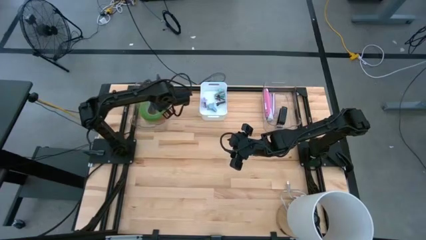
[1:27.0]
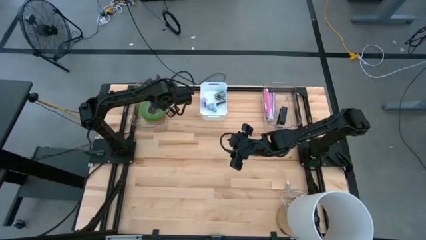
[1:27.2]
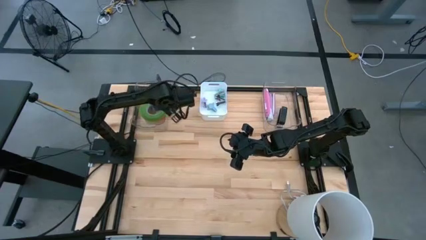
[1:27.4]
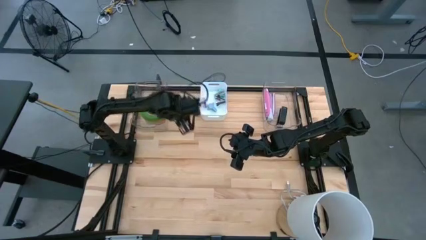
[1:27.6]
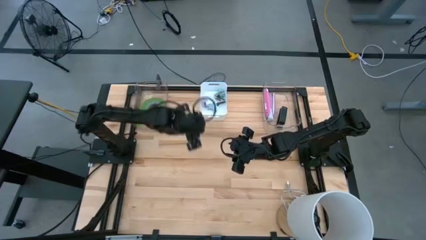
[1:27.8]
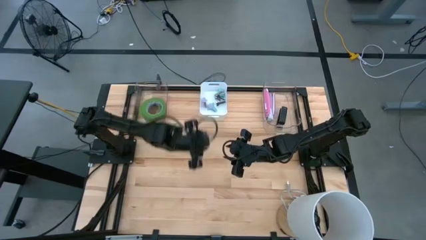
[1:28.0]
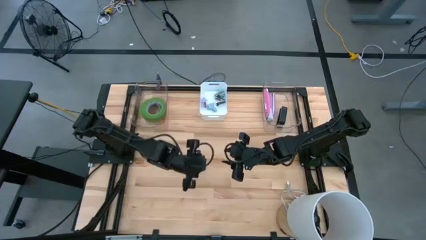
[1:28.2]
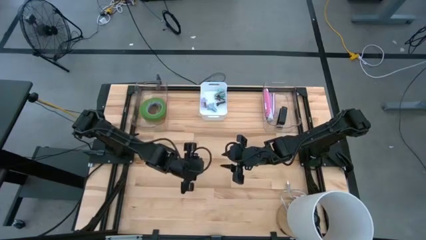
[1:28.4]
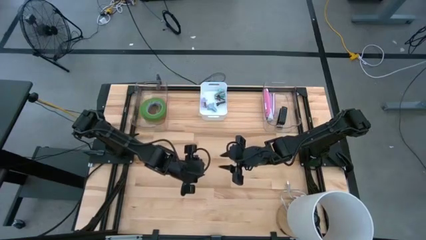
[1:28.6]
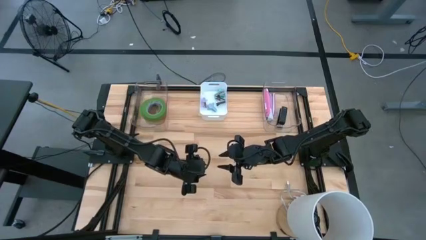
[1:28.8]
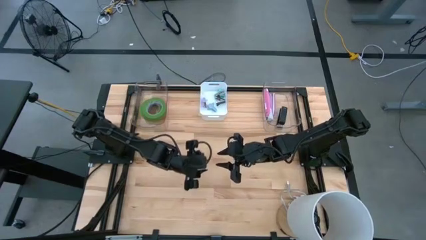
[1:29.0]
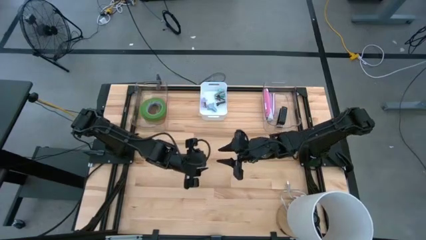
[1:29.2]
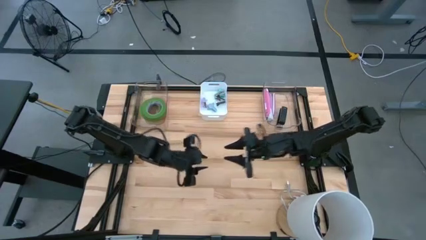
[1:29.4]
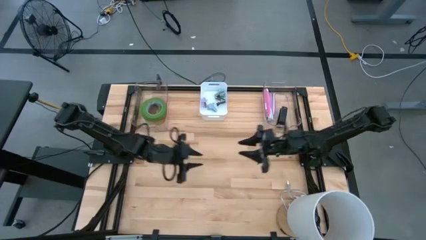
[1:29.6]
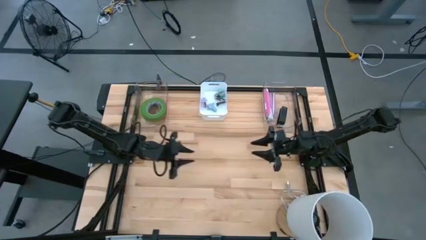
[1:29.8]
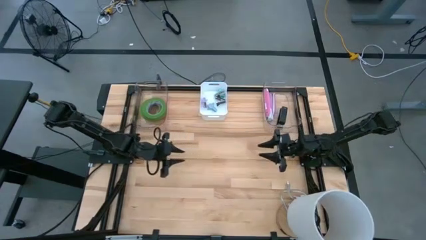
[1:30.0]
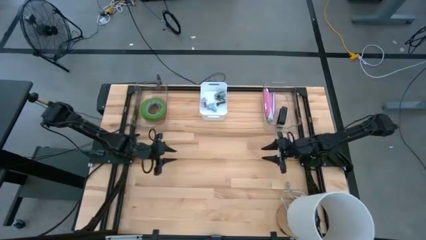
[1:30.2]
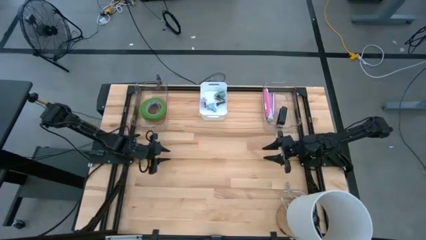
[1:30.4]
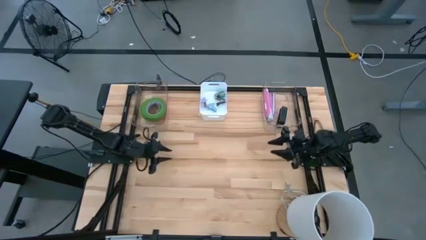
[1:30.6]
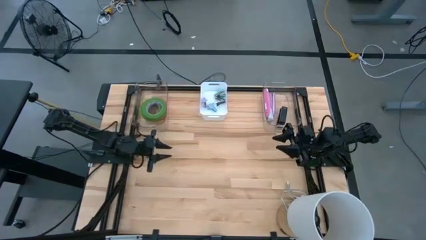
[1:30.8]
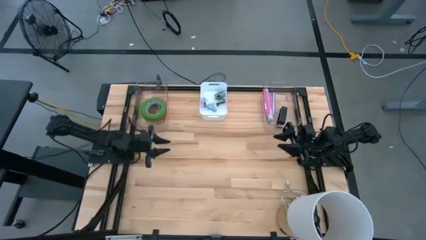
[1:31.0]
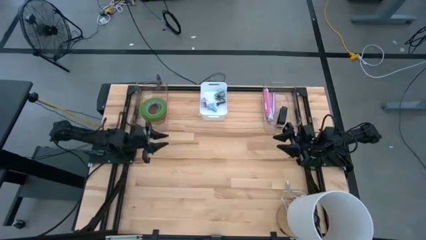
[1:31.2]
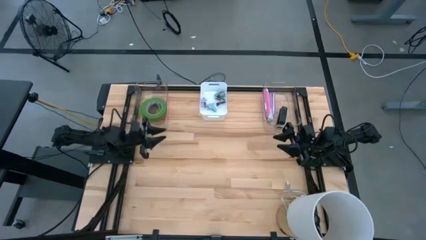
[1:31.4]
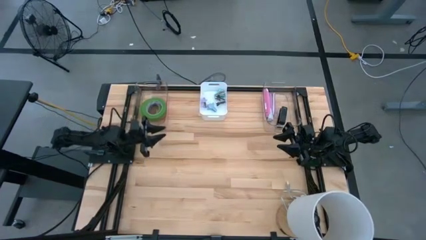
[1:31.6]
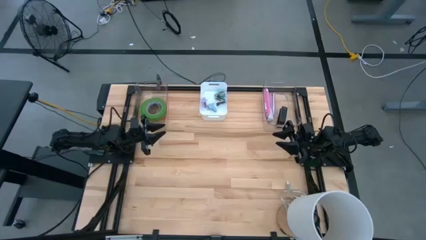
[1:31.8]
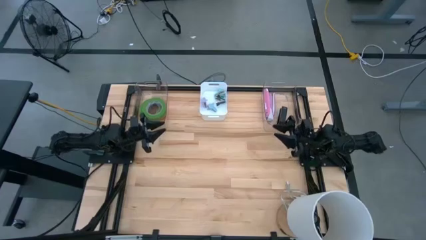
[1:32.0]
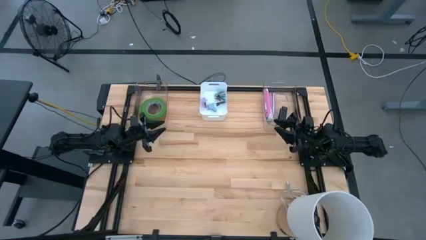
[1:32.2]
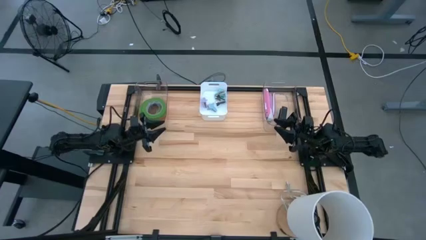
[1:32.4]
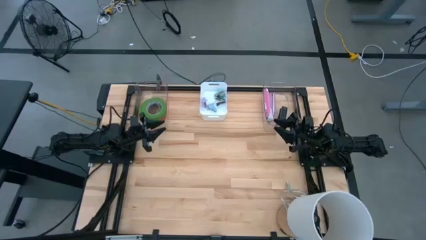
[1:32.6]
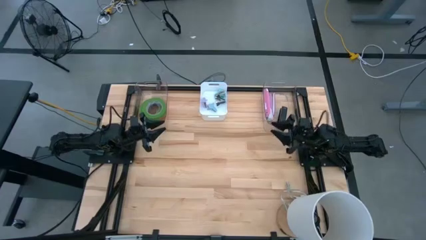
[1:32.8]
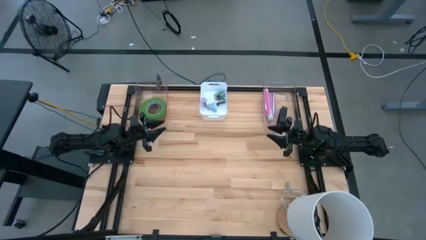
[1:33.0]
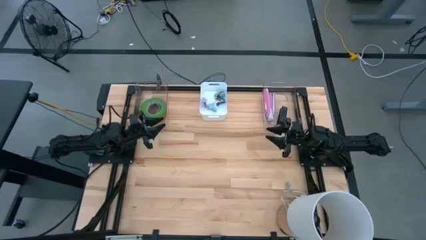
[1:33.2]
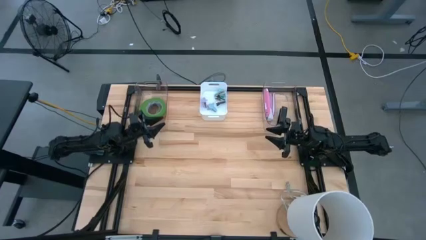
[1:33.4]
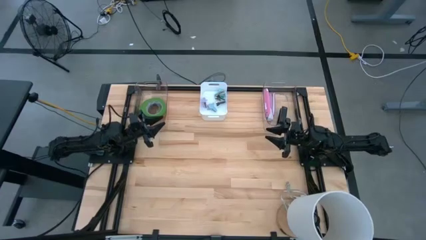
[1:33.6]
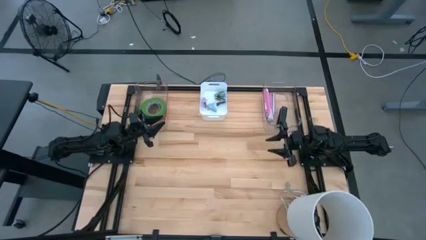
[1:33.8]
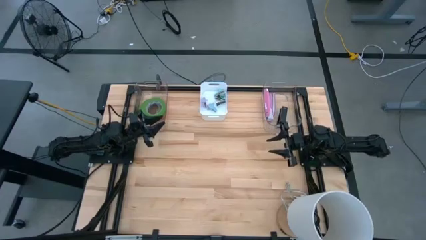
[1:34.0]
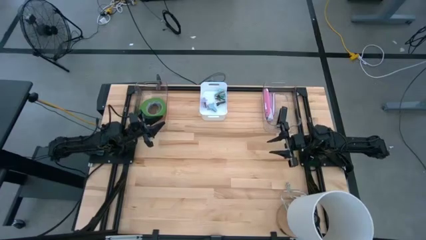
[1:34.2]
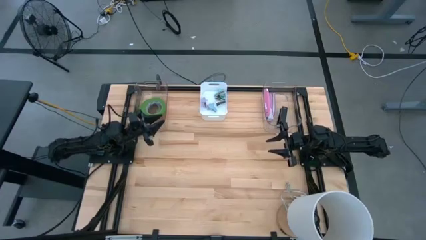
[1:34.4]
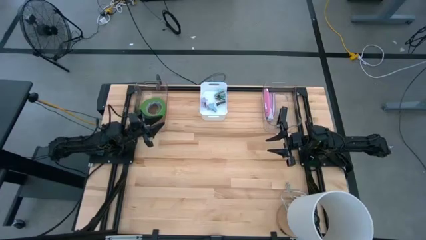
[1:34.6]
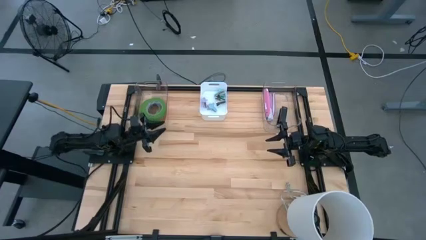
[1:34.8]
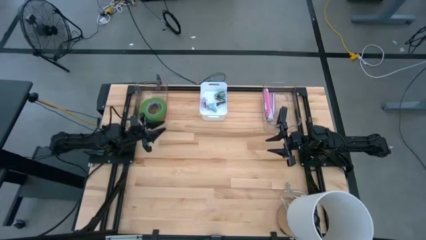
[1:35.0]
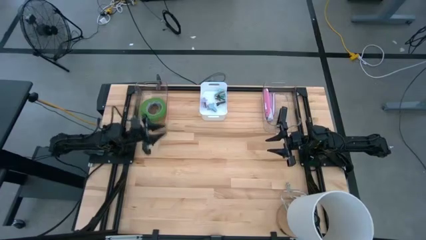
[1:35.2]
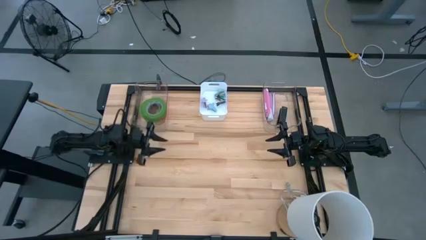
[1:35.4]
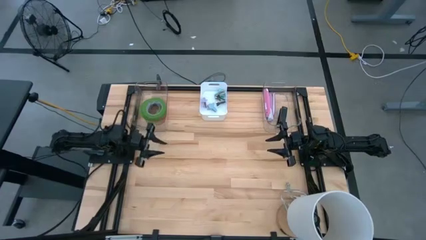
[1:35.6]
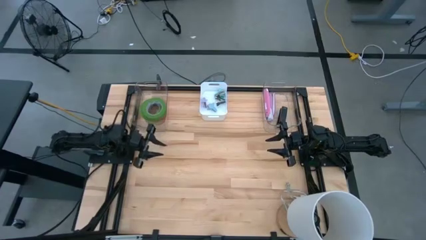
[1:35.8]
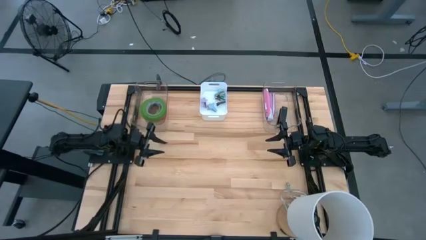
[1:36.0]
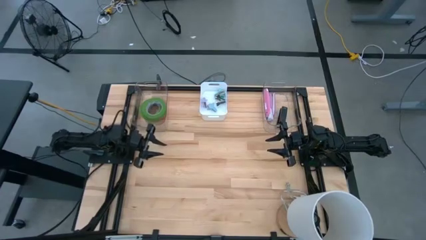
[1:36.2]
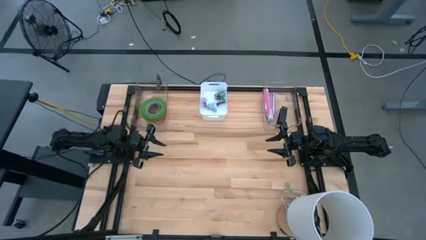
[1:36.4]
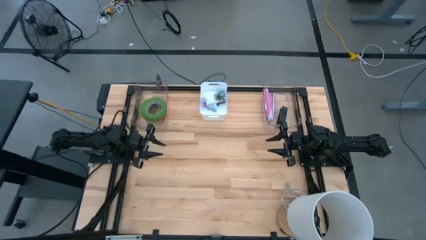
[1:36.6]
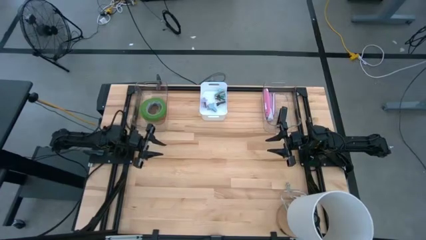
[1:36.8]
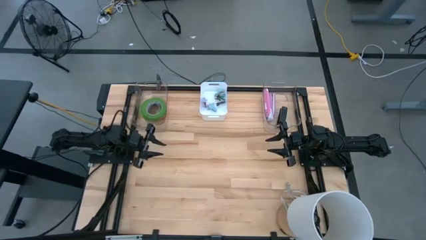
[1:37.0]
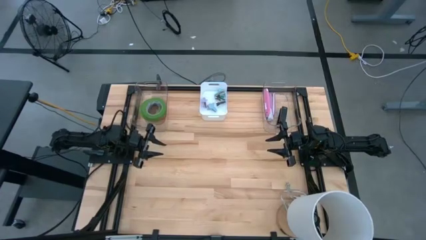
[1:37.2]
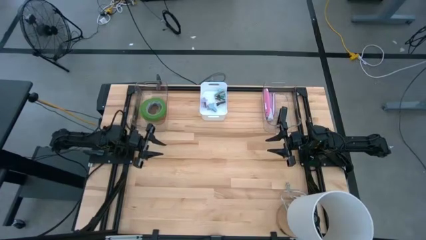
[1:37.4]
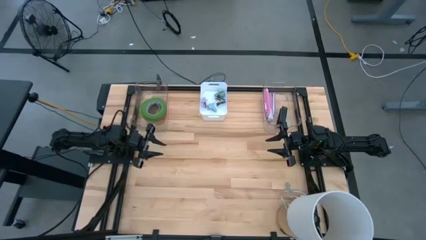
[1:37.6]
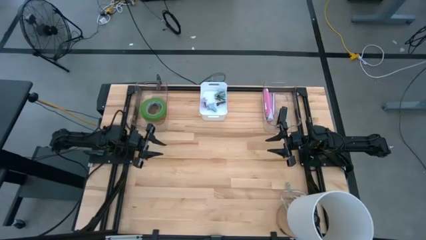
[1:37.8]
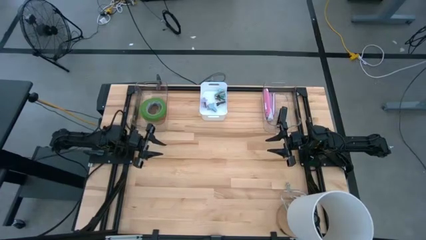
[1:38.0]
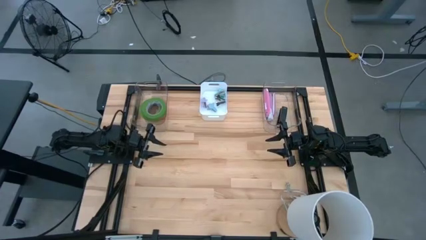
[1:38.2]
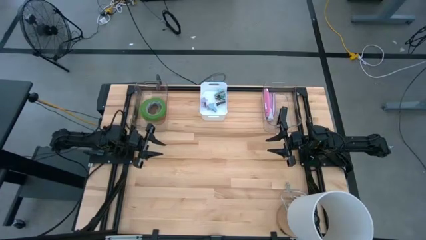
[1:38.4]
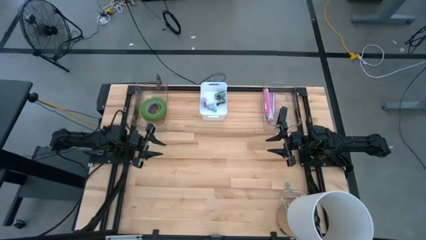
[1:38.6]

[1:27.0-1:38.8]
Task: Pick and place Stapler, Stapler remover, tape
Return to Home Position

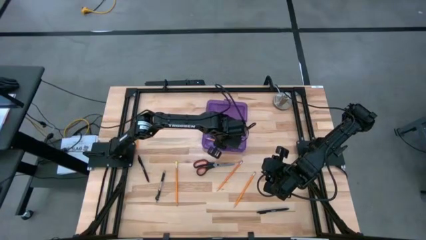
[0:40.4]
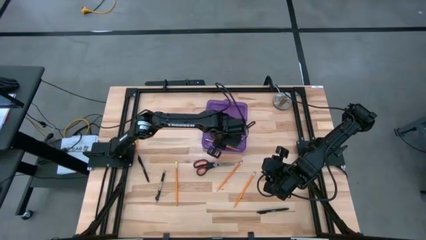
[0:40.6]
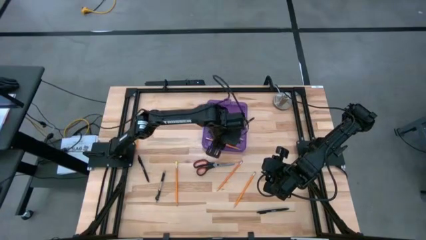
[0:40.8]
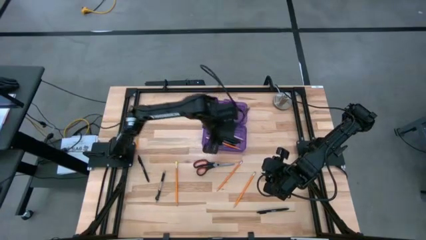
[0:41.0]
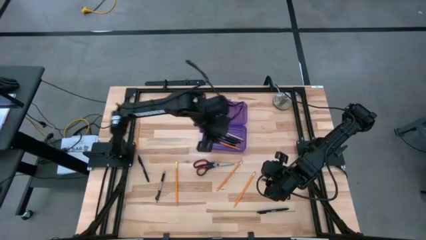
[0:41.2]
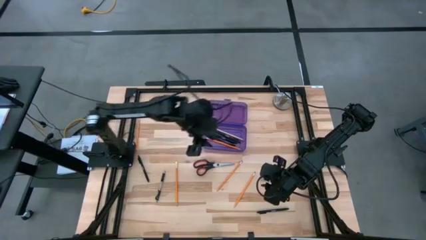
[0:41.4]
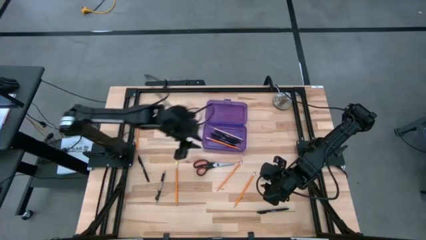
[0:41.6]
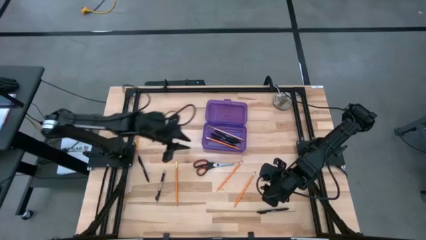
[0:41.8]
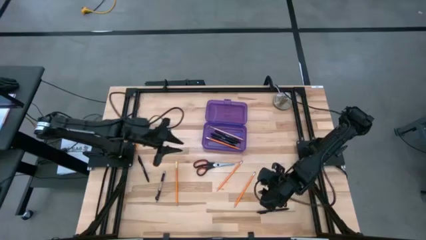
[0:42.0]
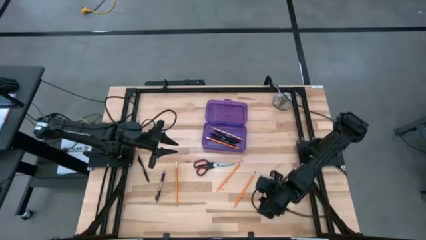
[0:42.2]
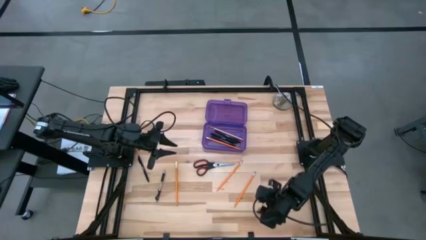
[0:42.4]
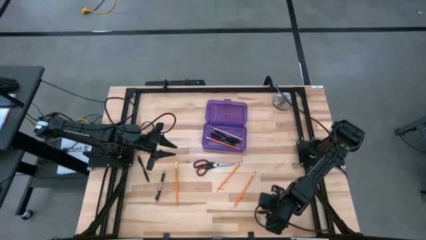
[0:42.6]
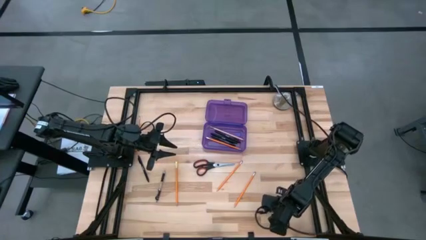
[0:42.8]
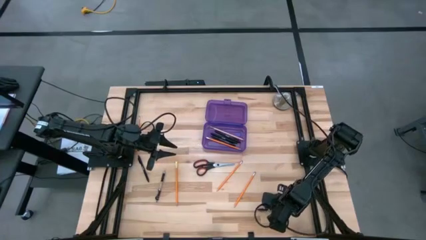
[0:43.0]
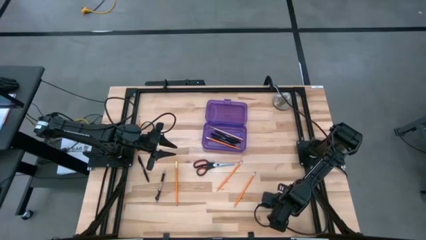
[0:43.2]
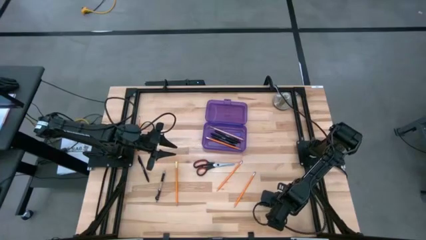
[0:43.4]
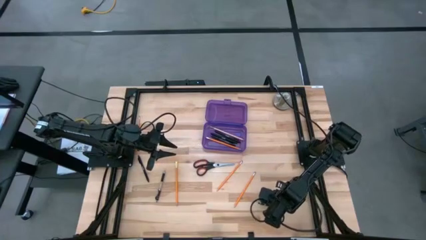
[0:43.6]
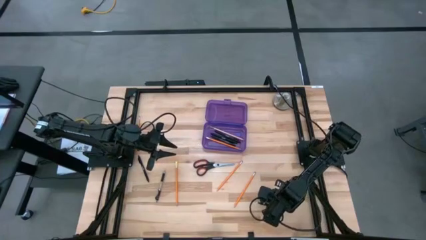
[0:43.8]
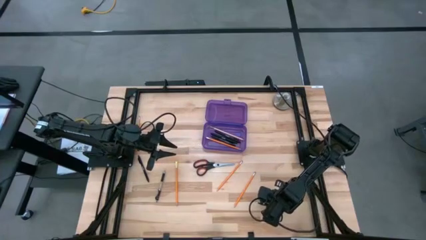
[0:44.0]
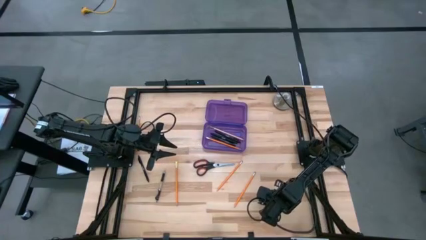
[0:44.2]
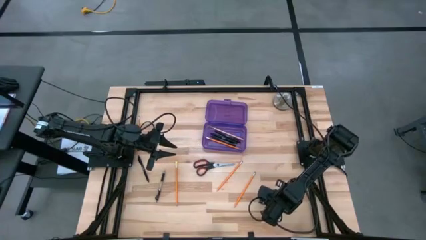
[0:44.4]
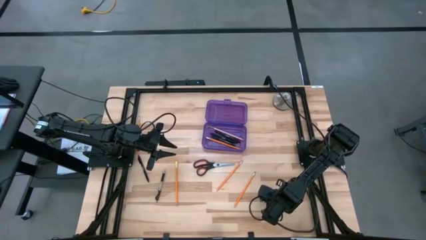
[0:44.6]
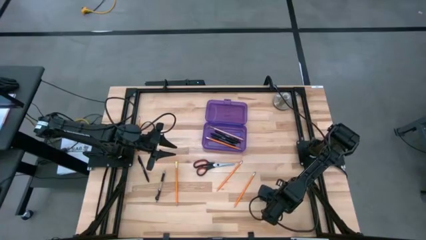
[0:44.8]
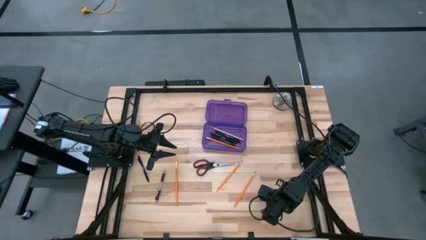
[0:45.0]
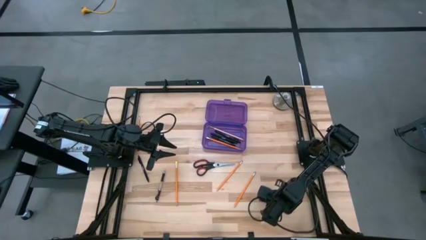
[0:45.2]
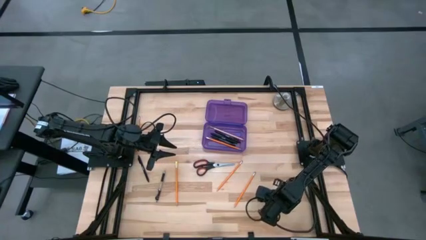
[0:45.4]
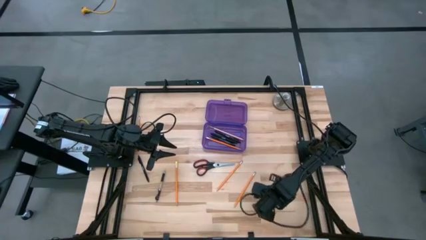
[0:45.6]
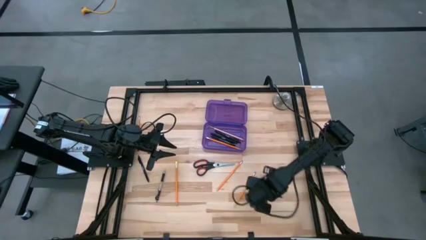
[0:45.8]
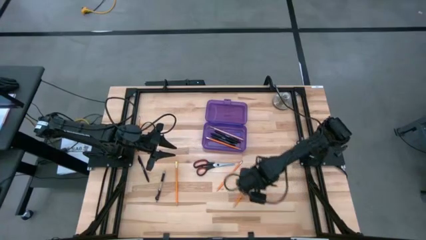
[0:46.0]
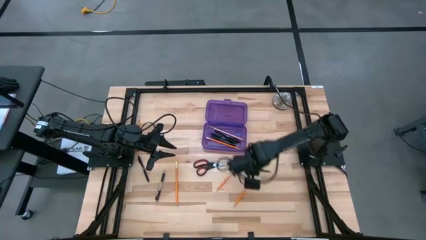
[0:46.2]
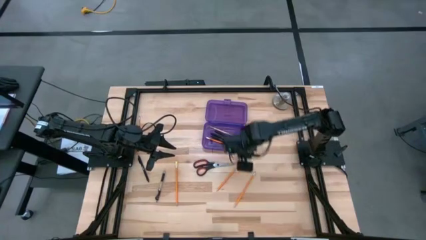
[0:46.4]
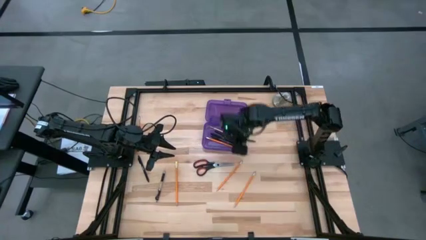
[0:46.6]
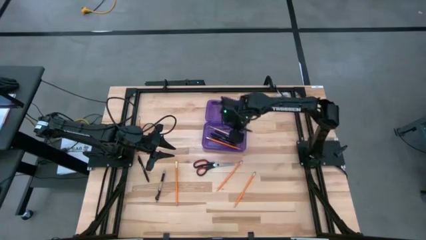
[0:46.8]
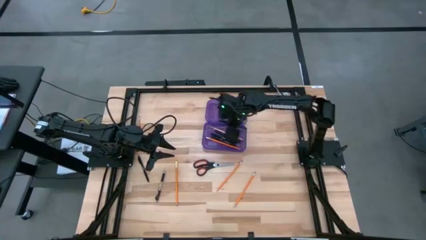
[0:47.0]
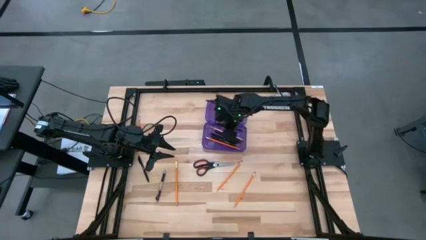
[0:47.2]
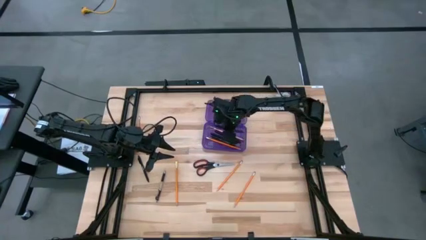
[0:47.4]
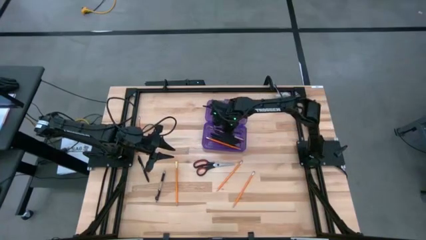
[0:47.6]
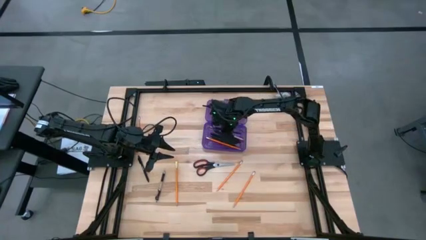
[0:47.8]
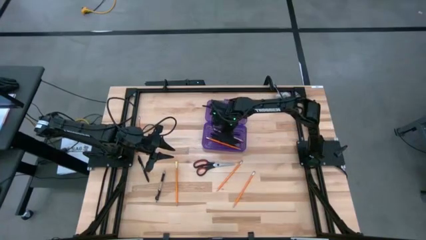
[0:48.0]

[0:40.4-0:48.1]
Task: Pick & place school supplies into a supply box
Put the bottom black pen into the pencil box
